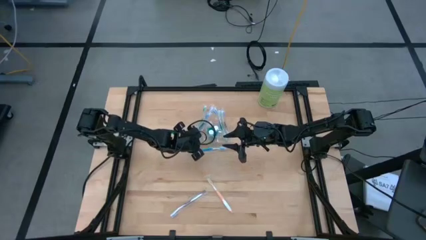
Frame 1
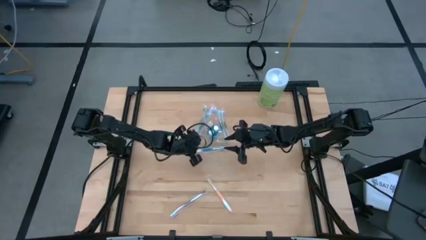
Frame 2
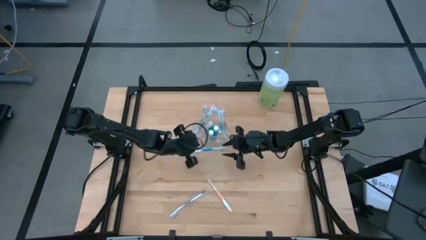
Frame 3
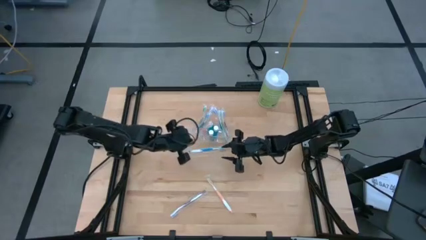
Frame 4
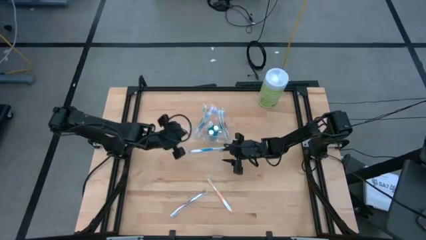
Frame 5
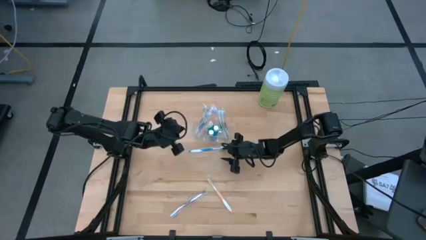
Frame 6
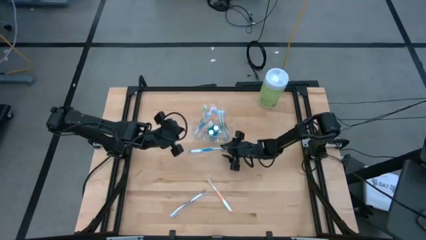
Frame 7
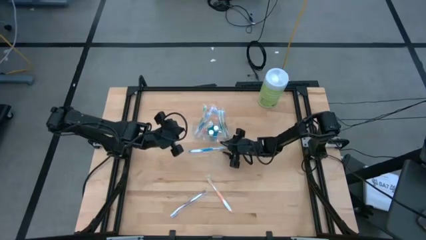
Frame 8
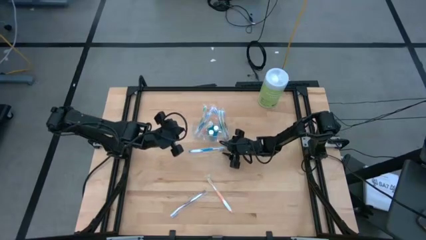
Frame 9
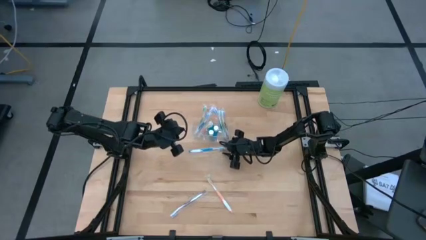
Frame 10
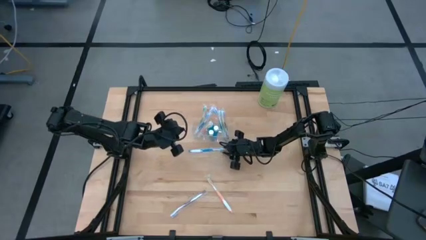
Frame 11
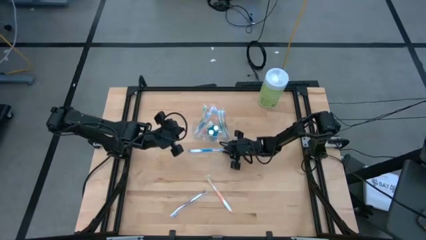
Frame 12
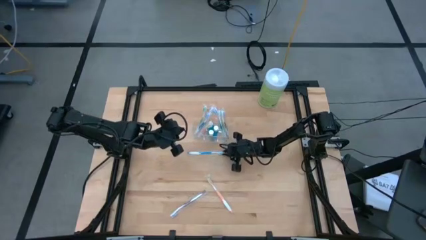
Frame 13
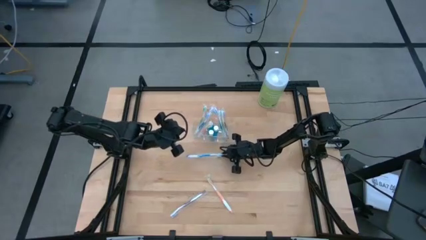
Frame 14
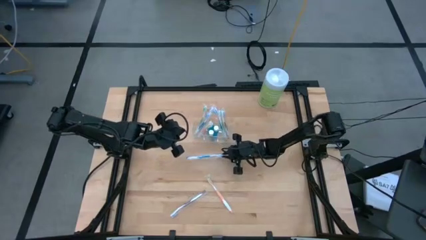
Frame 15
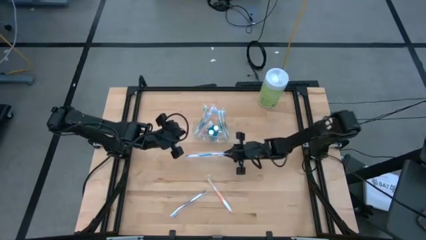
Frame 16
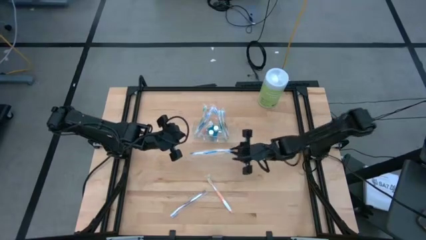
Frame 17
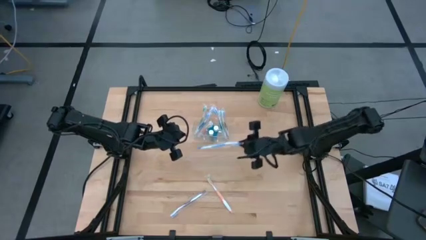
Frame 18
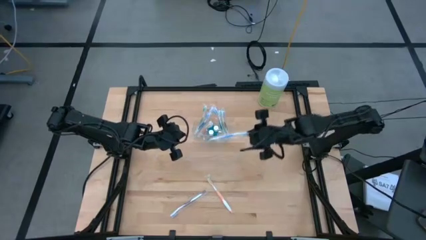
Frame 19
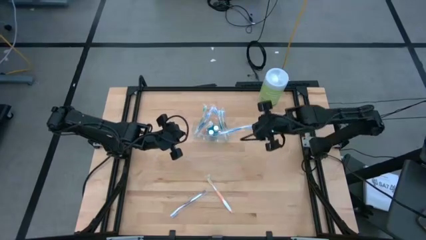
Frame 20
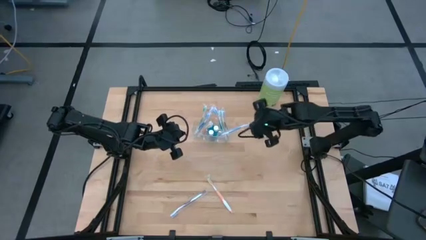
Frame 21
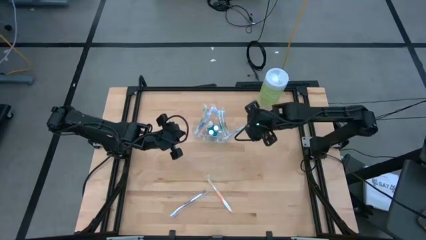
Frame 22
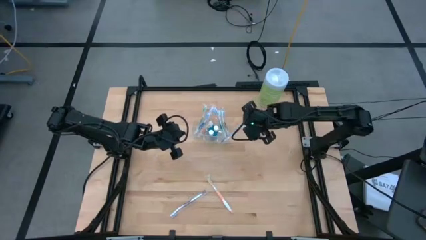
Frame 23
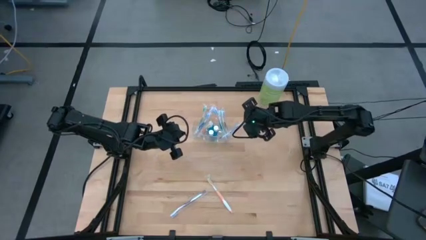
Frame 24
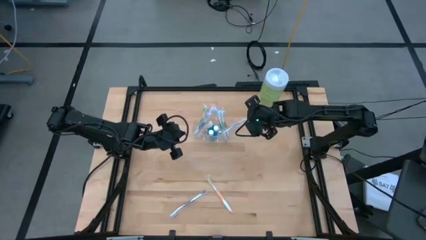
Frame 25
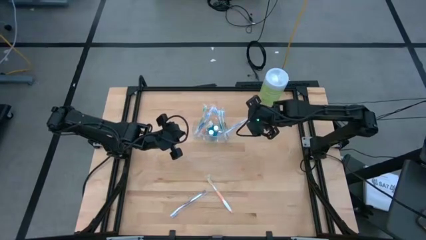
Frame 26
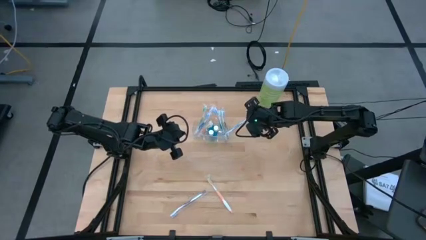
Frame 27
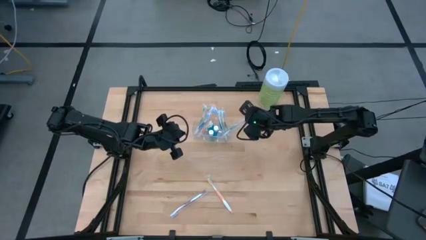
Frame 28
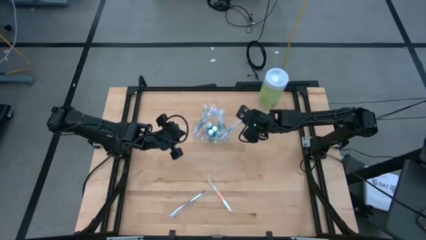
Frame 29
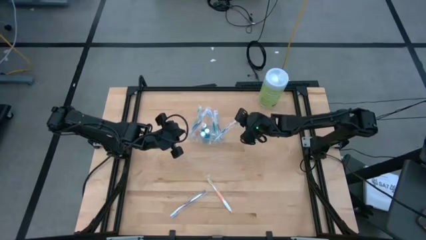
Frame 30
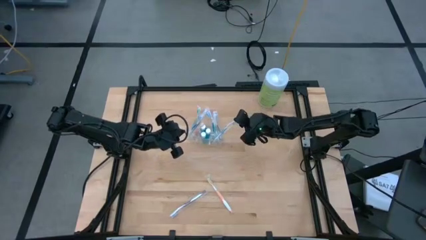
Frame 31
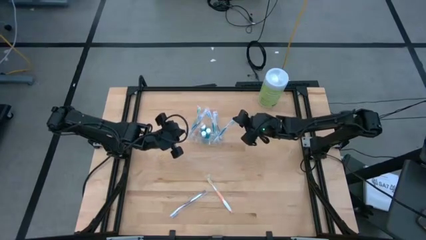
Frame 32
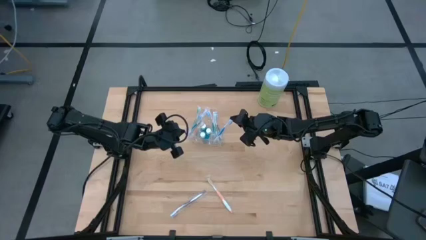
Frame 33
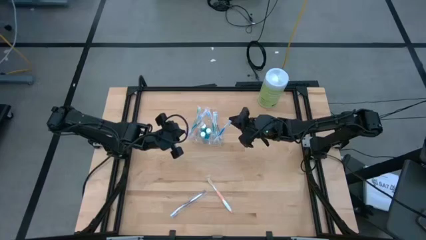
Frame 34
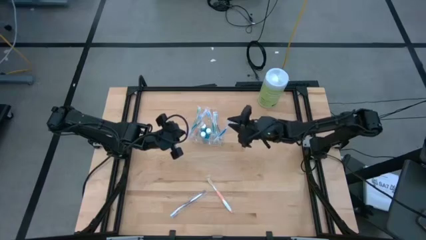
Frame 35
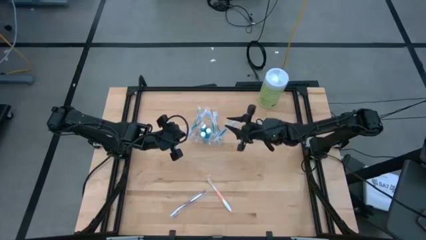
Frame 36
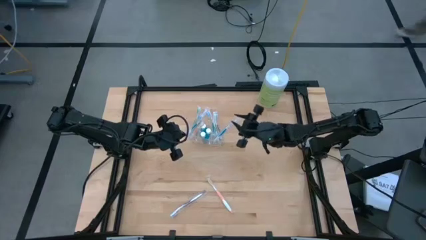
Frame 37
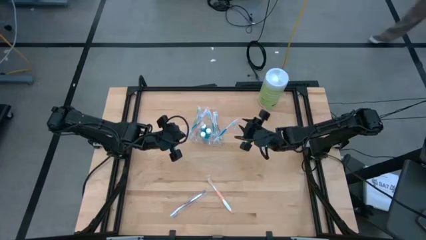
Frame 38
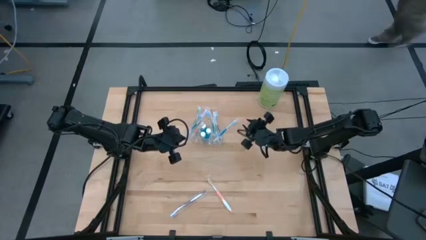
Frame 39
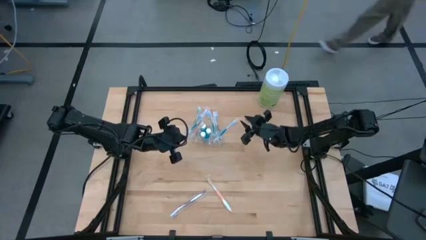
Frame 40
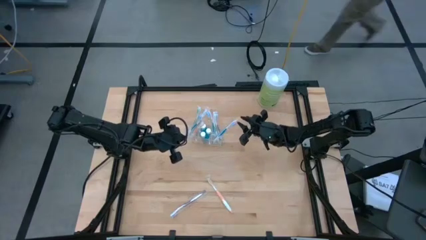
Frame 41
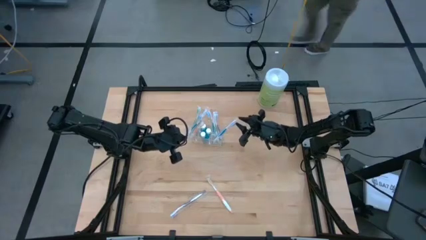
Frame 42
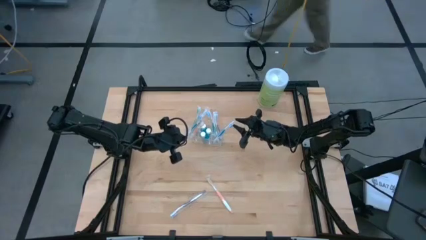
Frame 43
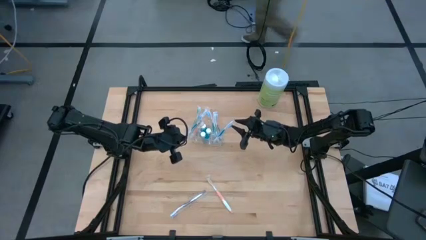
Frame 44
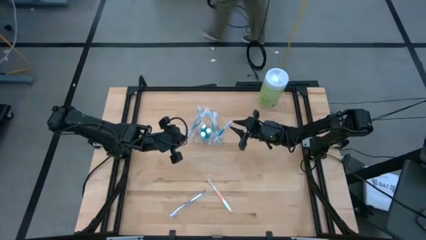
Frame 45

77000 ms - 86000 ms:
Task: Pick & Place toothbrushing station
Put the blue toothbrush into the transparent organizer

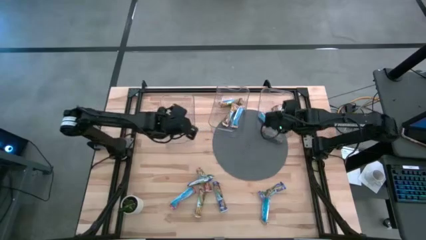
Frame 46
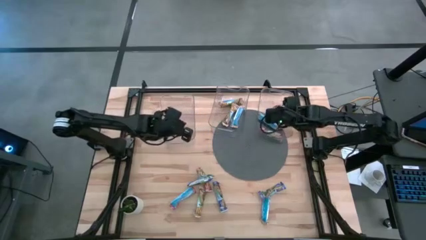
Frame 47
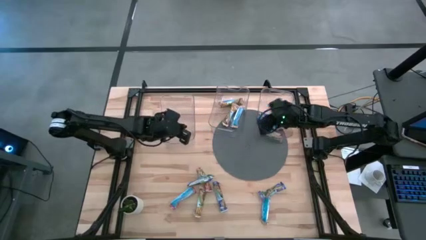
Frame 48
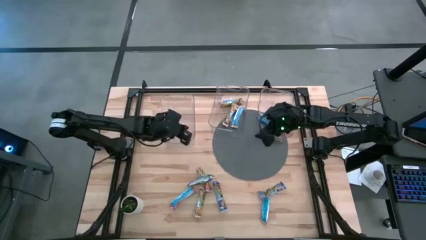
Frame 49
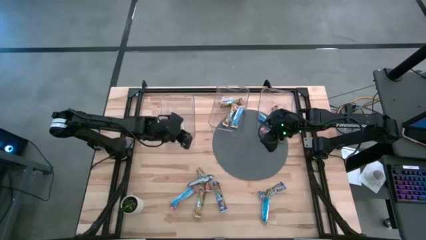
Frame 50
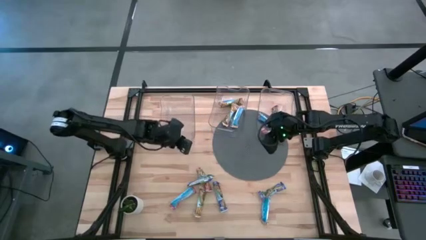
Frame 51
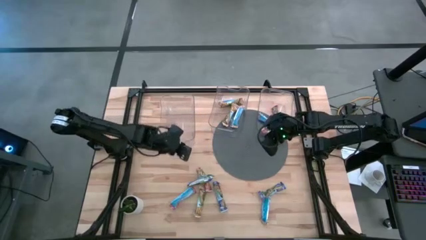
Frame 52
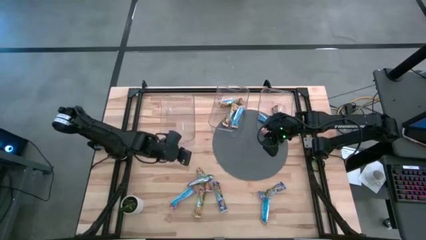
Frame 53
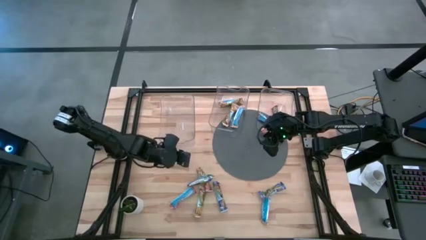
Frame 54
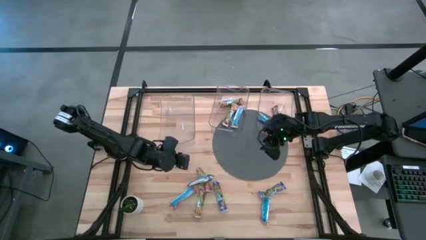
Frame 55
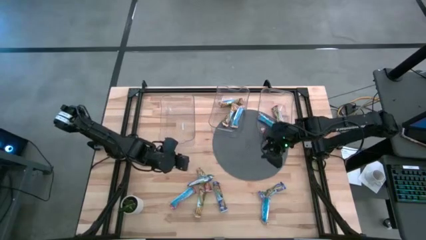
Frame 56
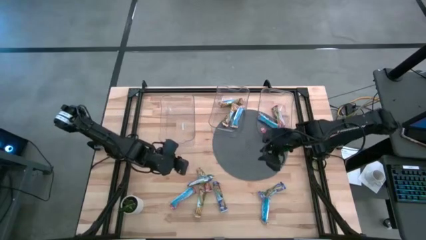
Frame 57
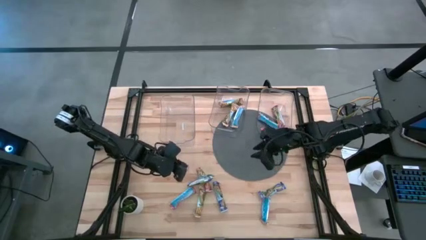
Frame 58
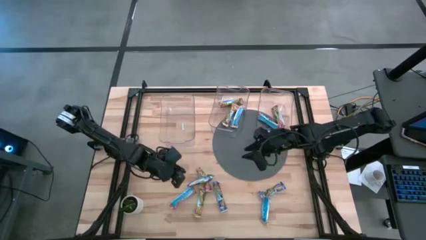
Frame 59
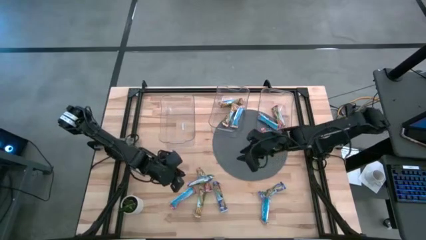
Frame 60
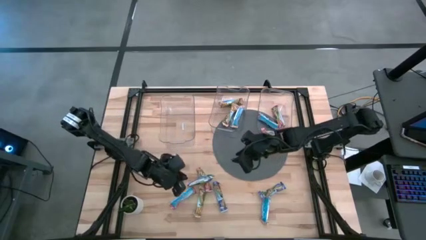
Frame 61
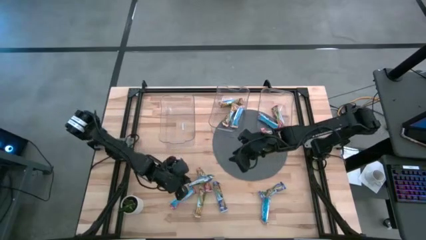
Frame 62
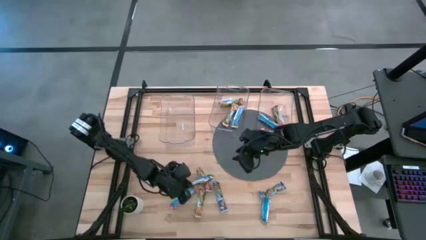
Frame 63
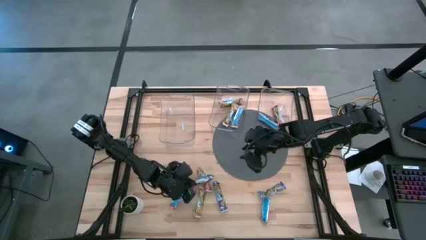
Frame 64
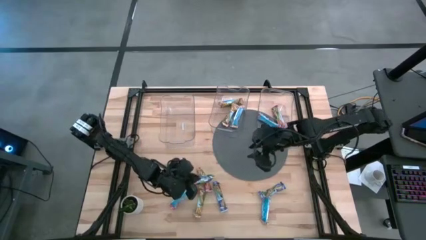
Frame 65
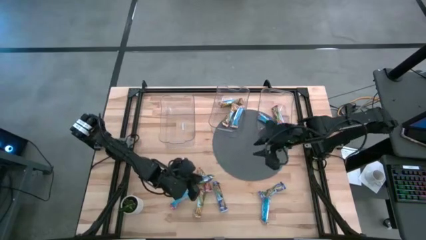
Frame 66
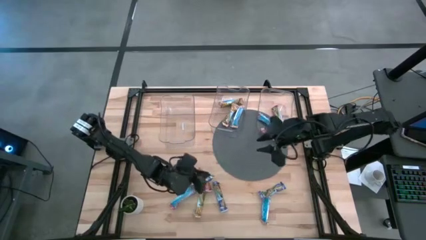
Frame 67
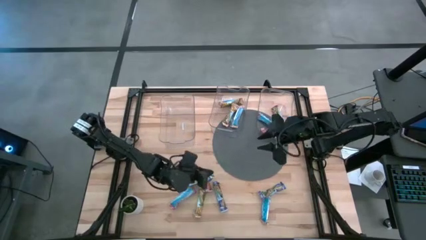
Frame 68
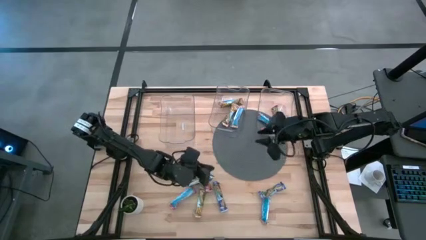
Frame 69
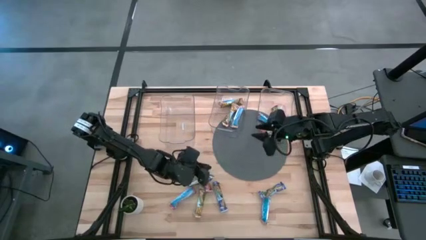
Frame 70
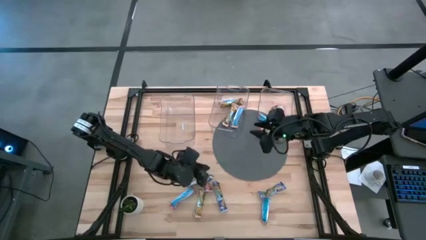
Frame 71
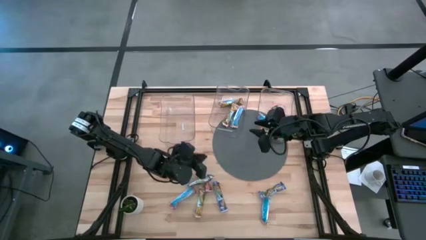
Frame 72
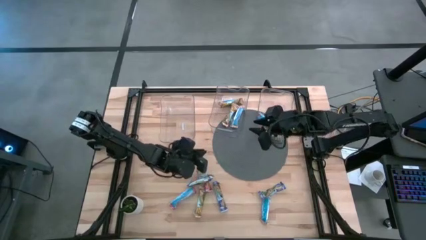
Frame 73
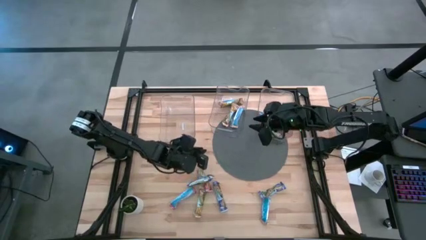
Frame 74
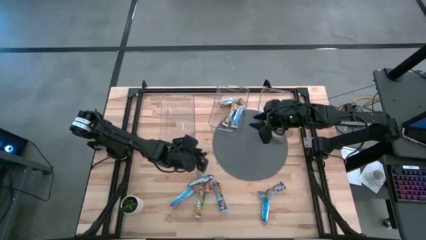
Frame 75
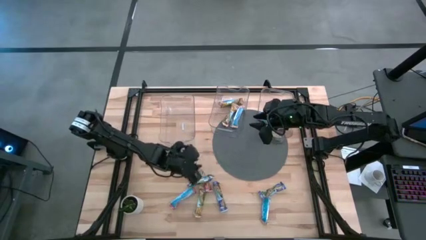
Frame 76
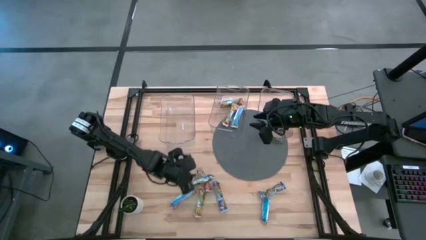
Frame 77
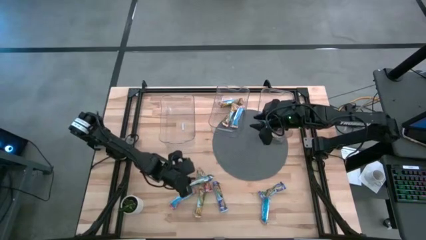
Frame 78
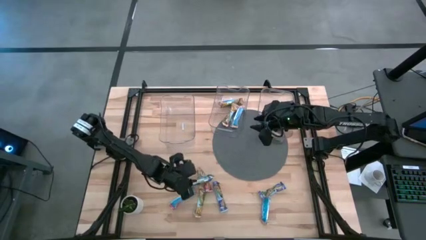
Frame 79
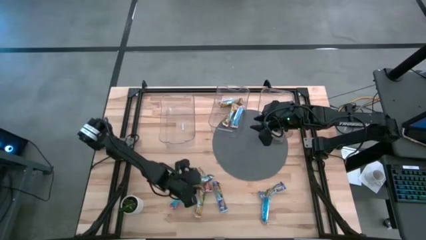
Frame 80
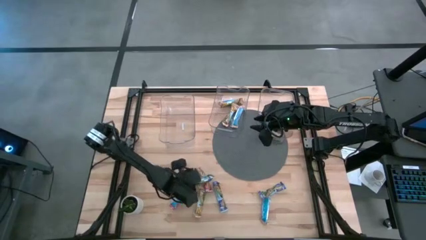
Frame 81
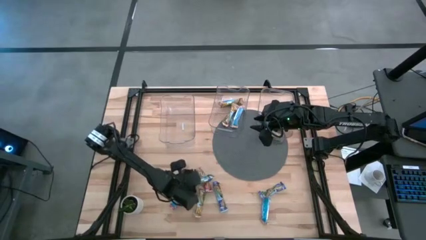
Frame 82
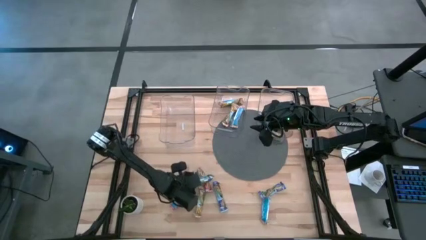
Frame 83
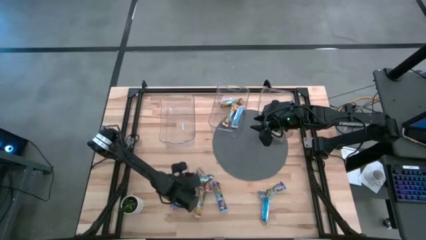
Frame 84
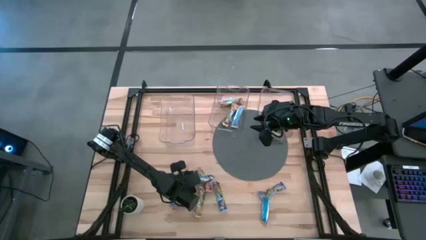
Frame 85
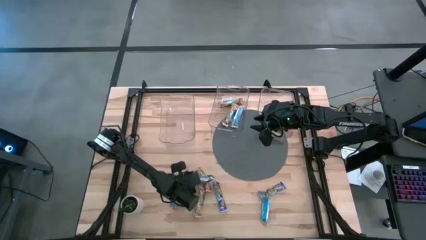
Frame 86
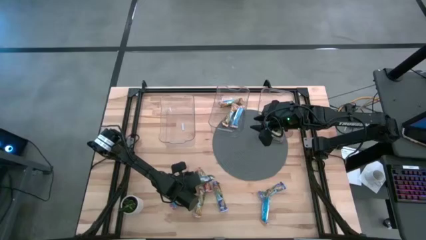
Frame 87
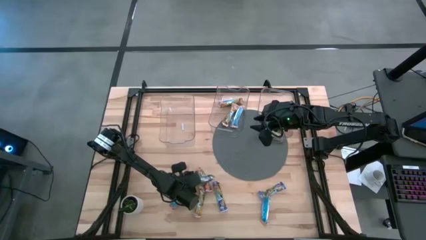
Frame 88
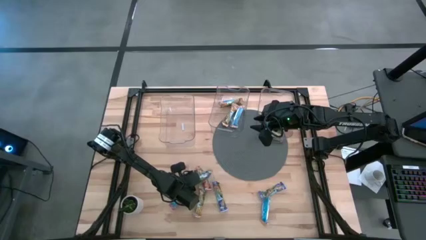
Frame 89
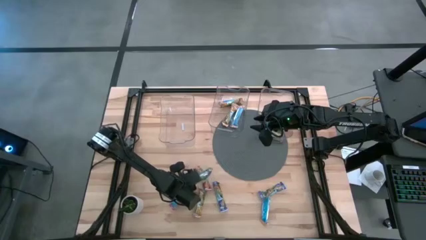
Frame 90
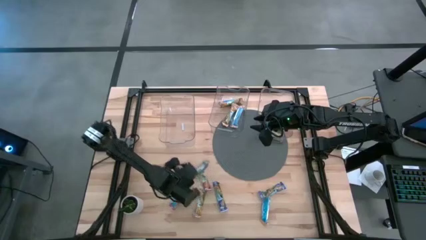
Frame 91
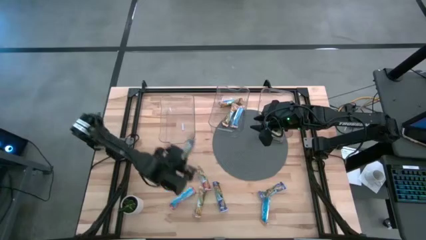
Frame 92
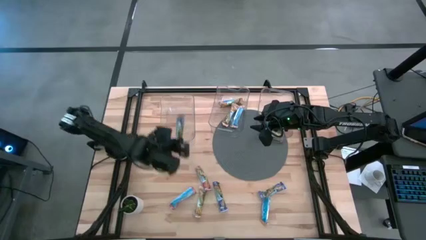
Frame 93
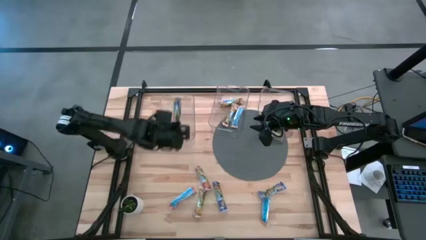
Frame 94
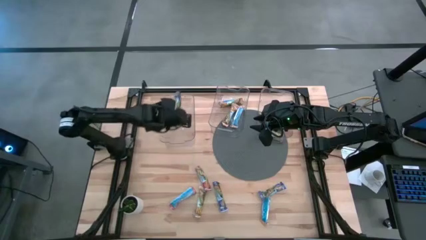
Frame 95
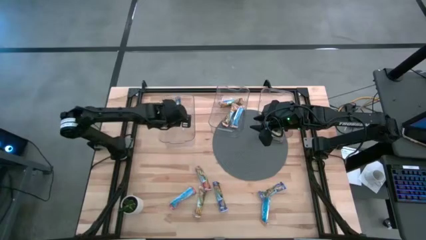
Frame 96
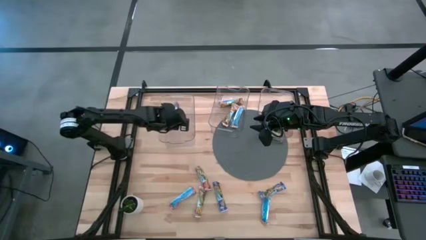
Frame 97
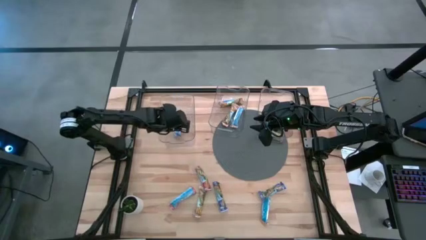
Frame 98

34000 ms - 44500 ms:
Task: Pick and place Granola Bars by type
Put the blue granola bar into the left transparent bin
